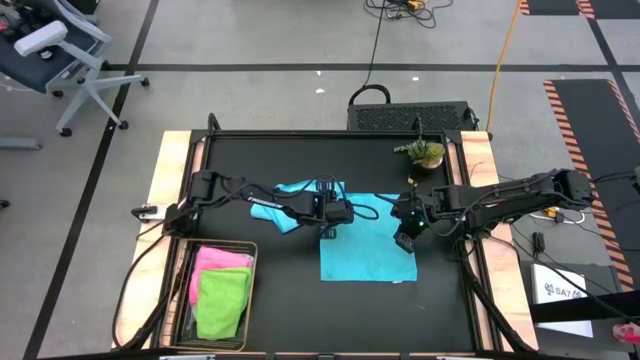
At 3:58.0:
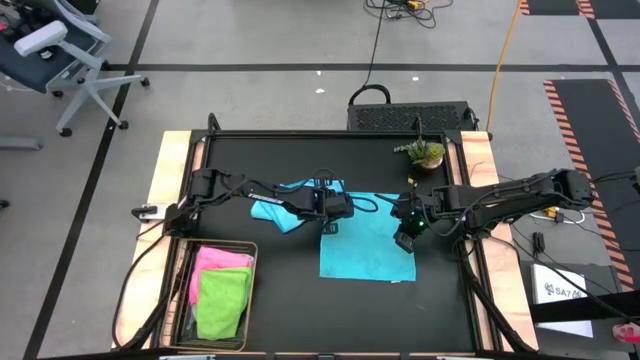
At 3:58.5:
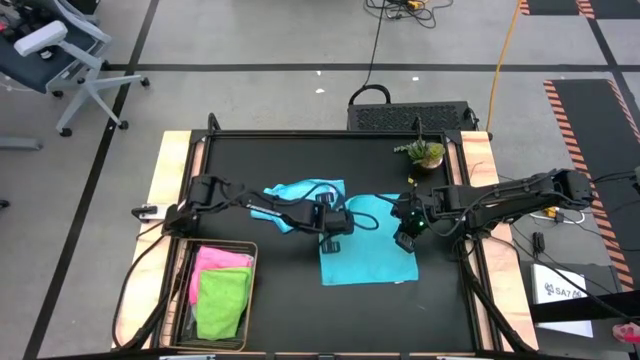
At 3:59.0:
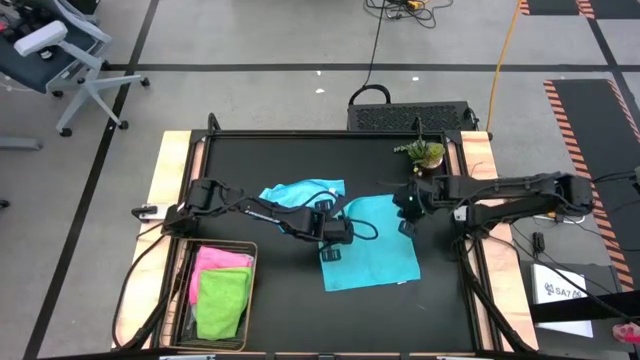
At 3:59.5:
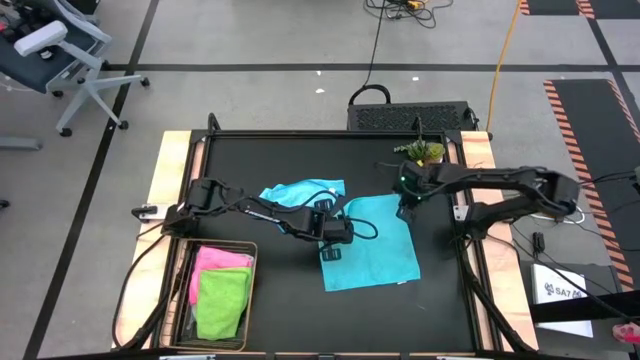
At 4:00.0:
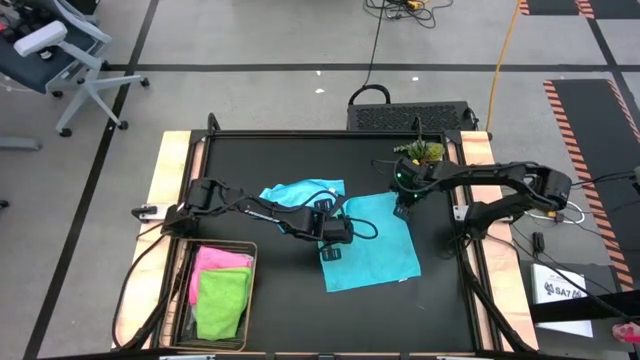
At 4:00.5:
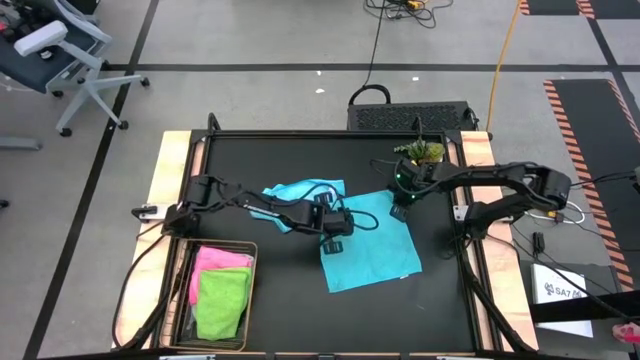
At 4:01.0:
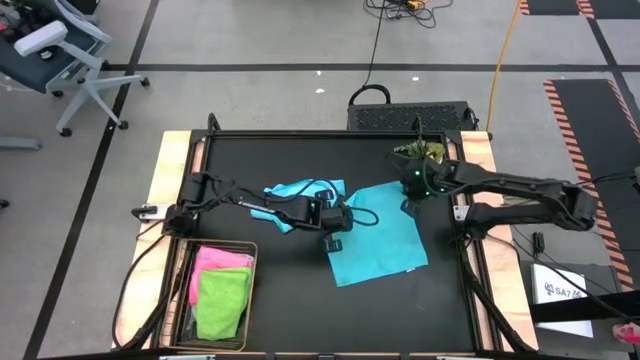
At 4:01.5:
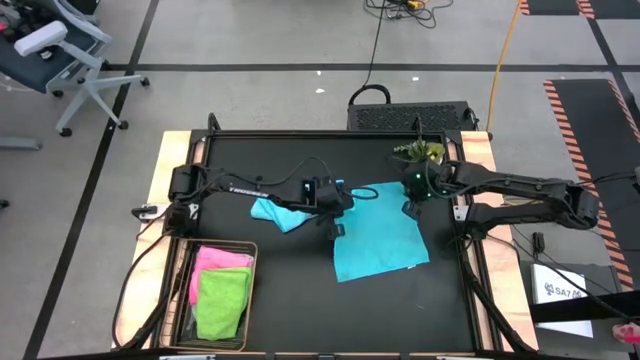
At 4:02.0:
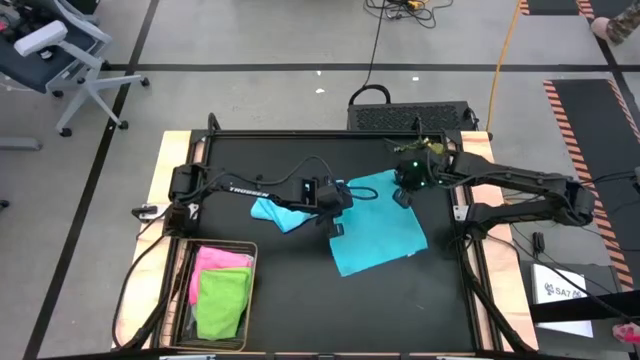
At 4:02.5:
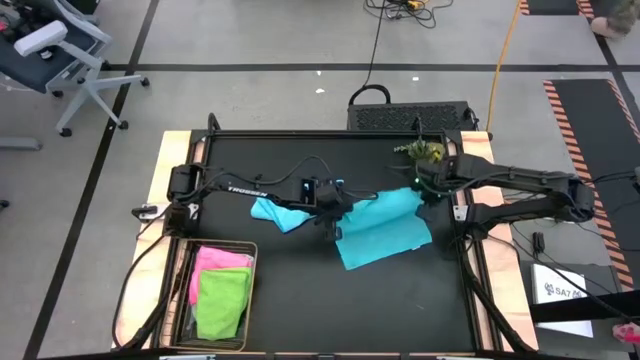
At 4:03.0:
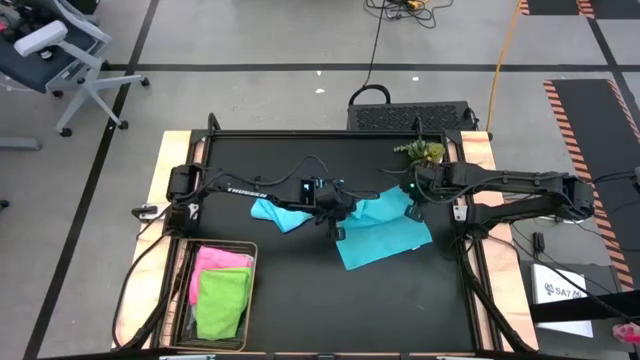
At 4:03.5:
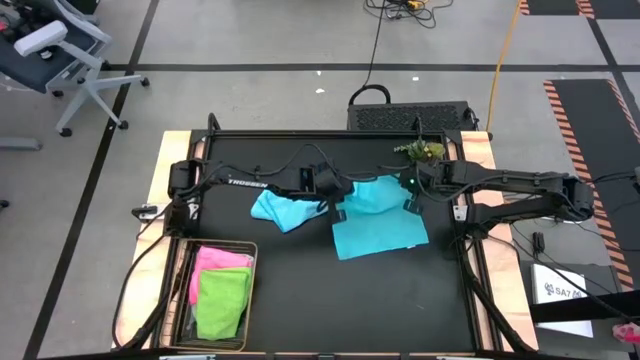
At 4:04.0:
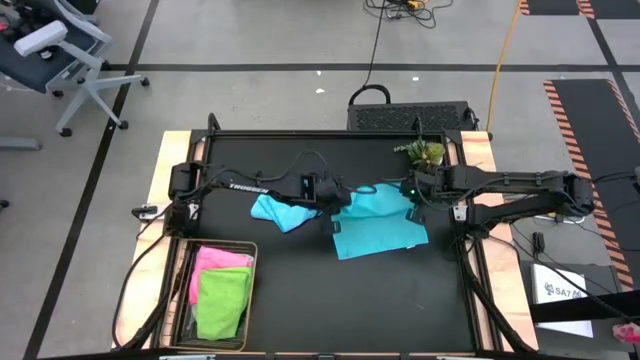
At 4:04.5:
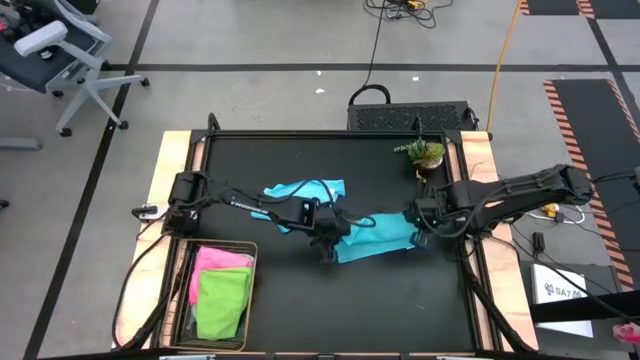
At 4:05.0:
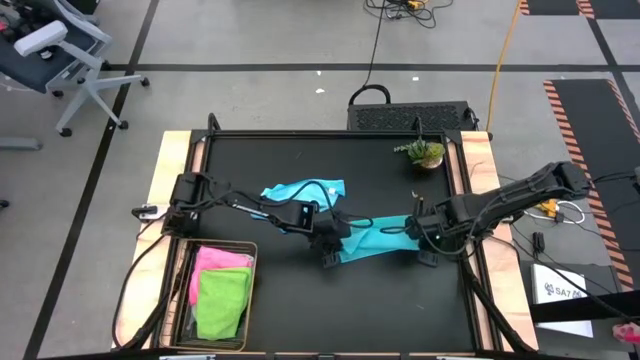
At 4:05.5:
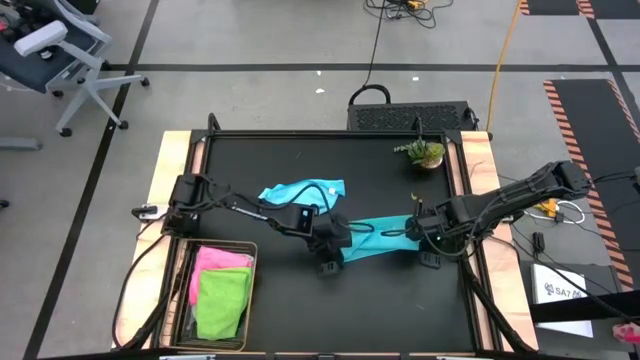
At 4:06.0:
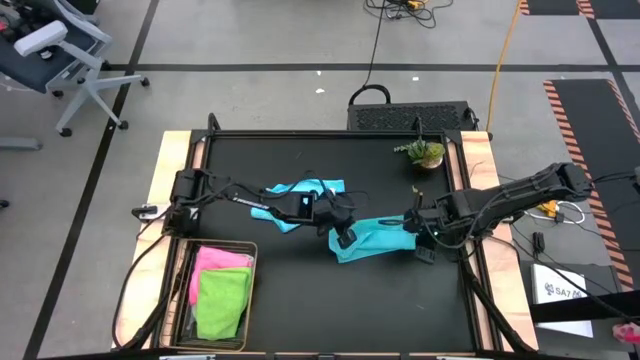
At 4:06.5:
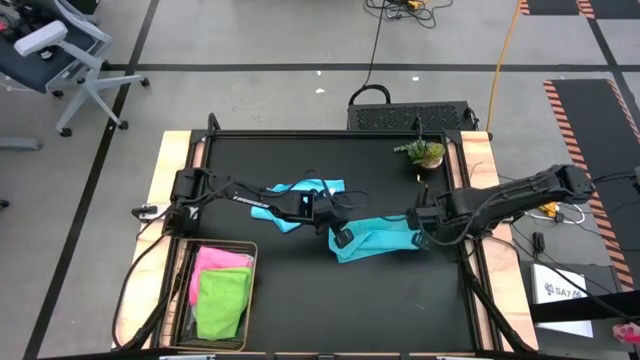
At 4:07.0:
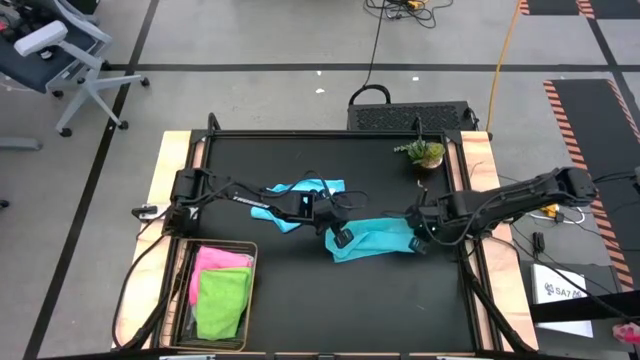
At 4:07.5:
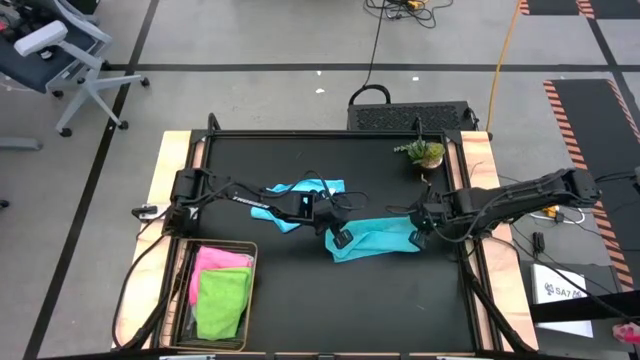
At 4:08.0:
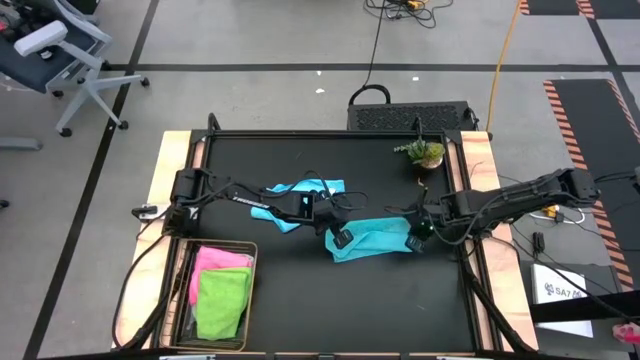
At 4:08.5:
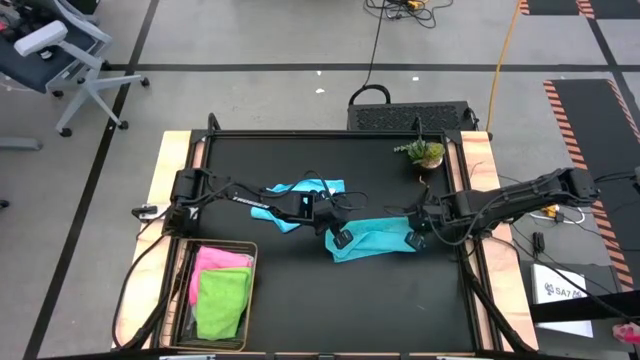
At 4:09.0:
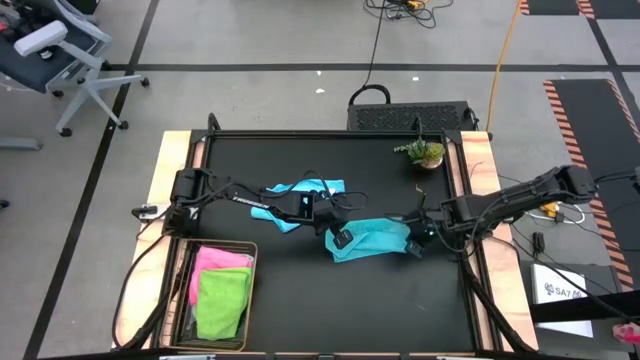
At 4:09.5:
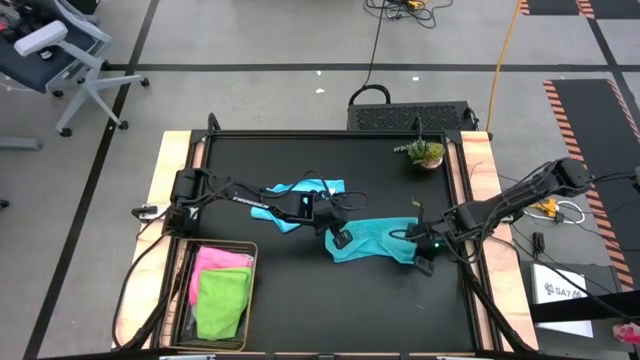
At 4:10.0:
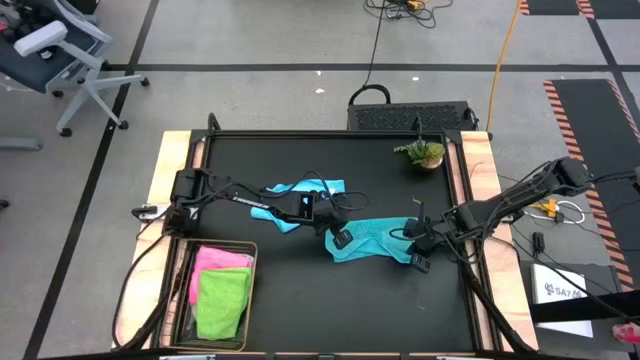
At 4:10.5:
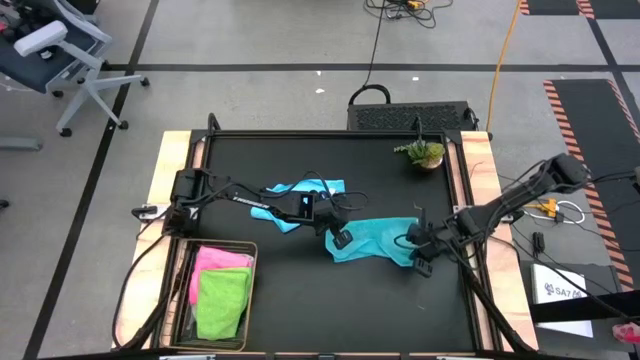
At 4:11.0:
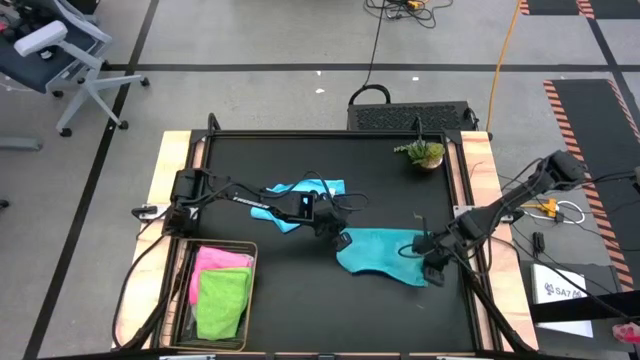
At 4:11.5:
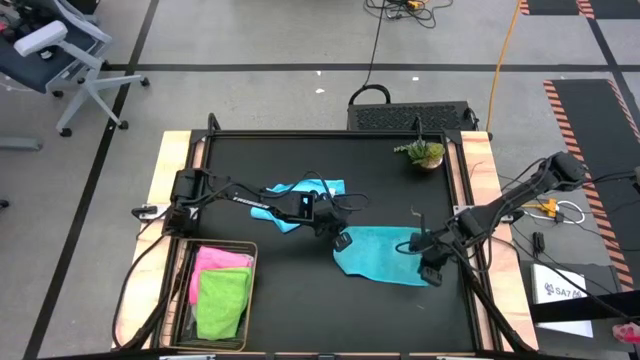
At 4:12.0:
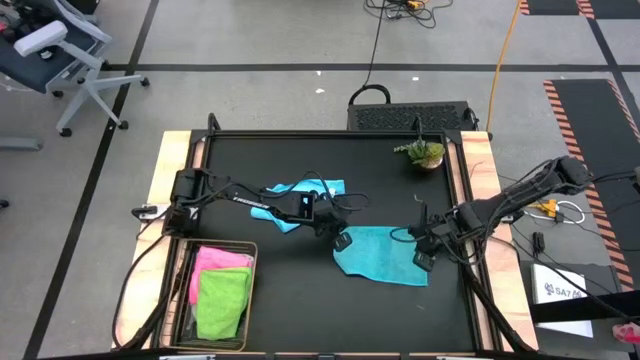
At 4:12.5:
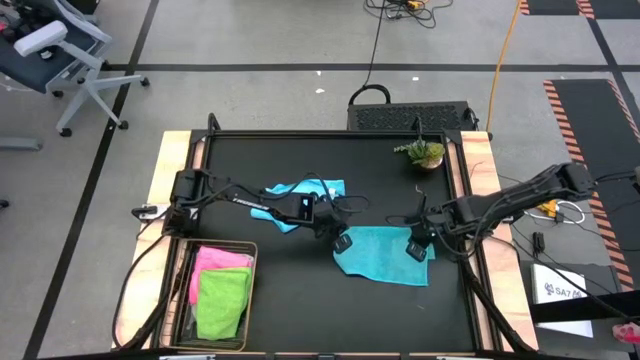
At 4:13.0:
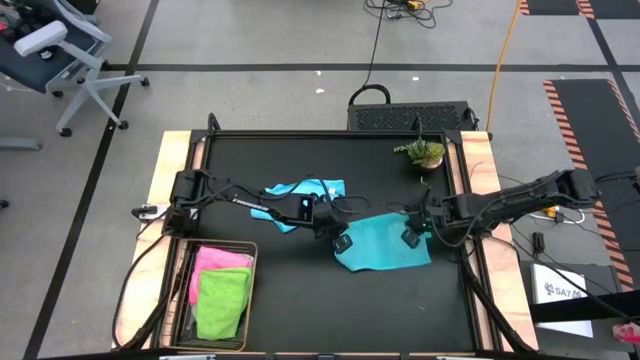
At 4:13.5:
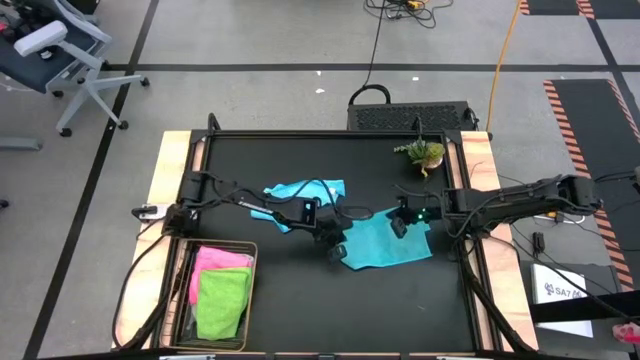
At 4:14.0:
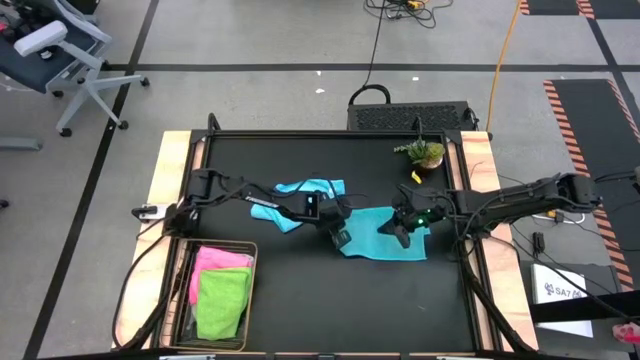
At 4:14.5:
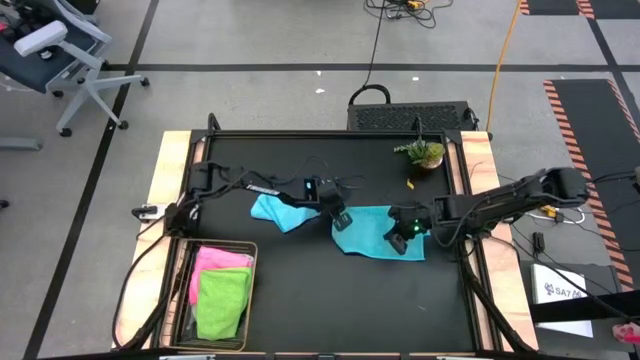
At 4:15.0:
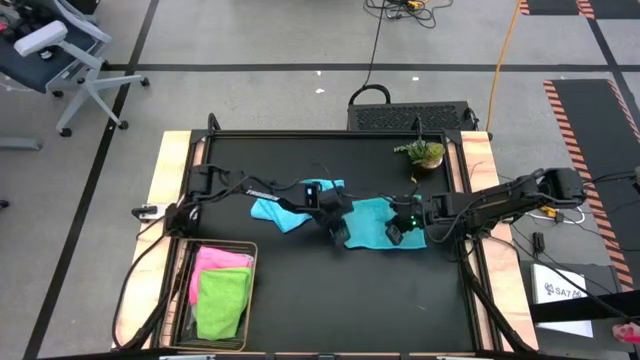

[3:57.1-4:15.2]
Task: Fold microfiber towels
Fold the right blue microfiber cloth

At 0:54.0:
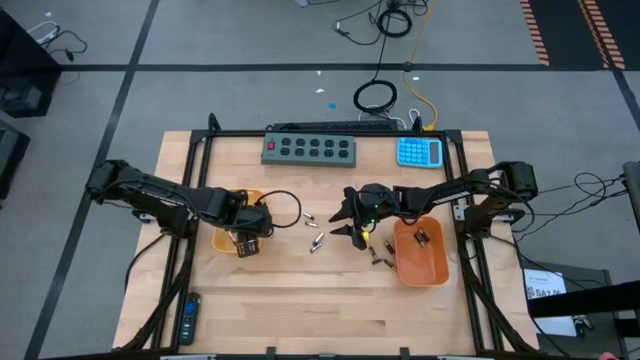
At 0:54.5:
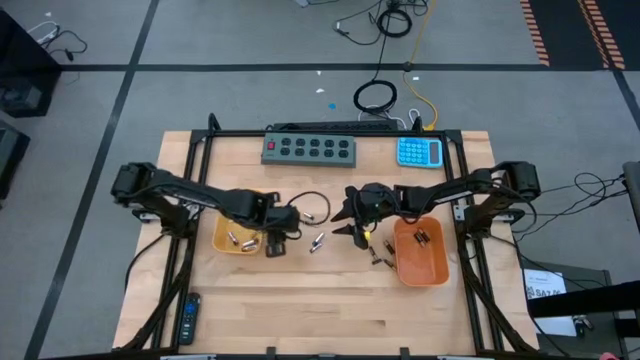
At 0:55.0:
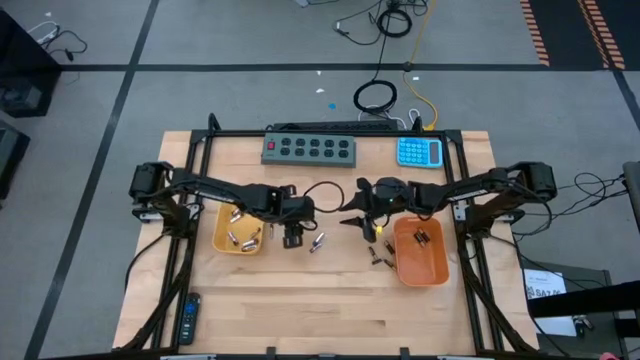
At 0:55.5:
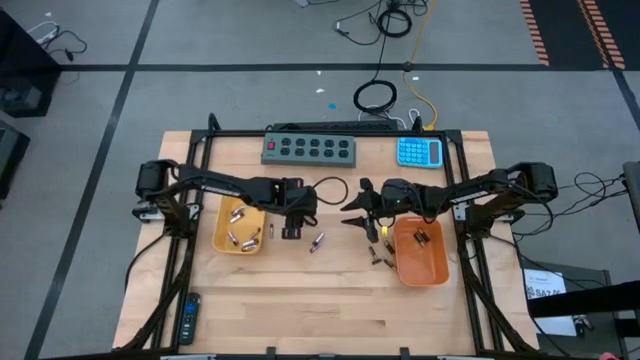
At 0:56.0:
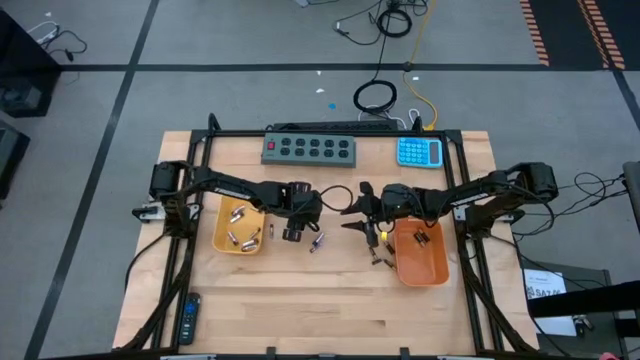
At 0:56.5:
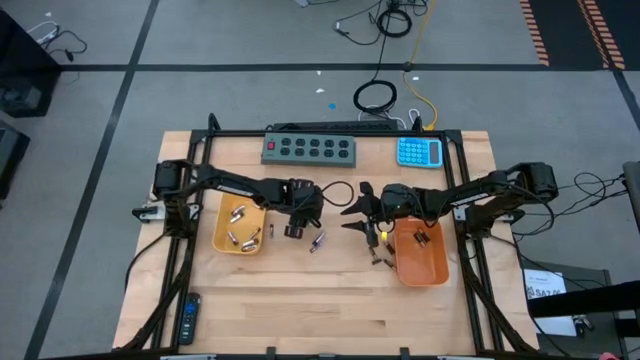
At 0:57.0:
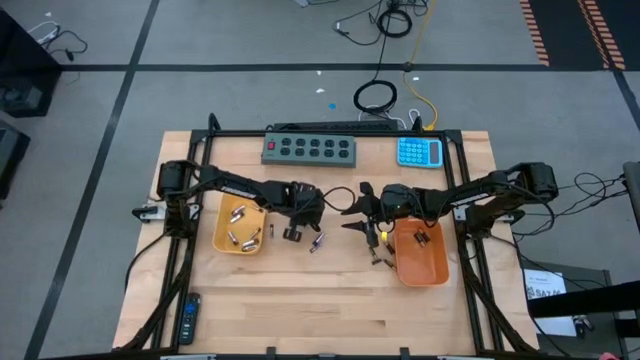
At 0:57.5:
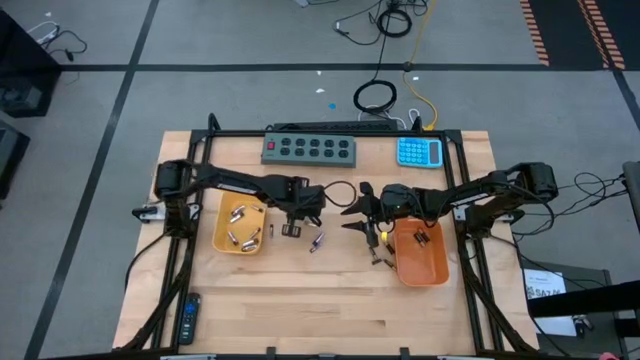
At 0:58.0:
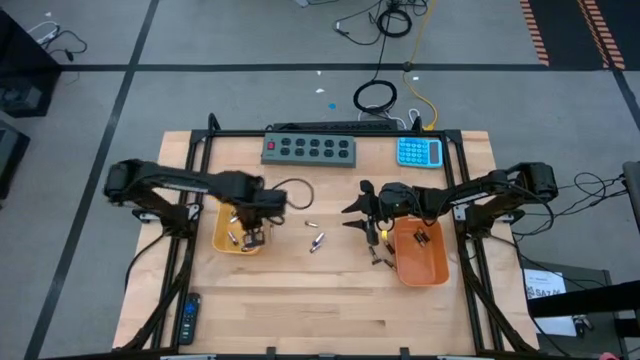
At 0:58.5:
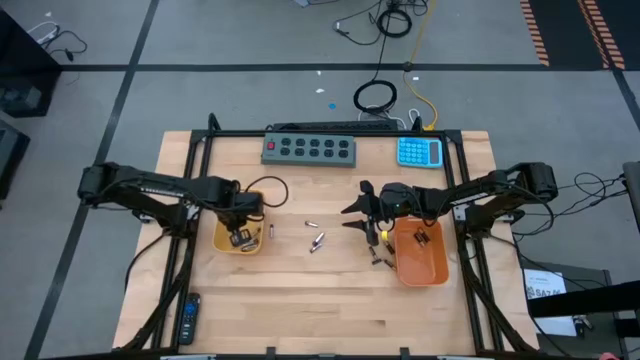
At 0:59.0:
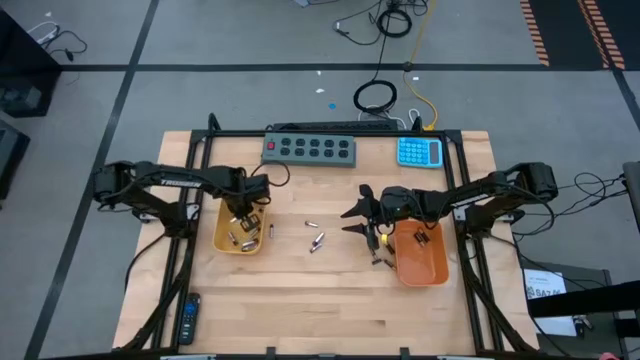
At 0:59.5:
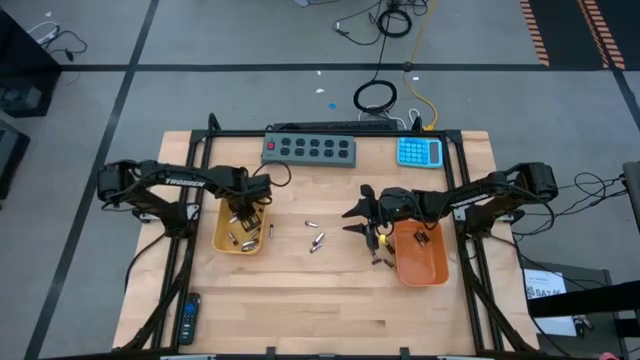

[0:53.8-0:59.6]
Task: Sort batteries
Put the silver battery into the yellow bin
